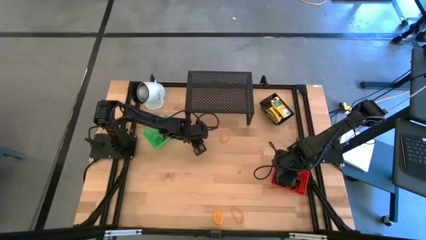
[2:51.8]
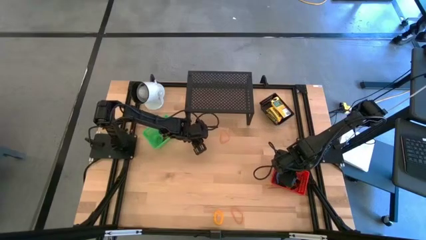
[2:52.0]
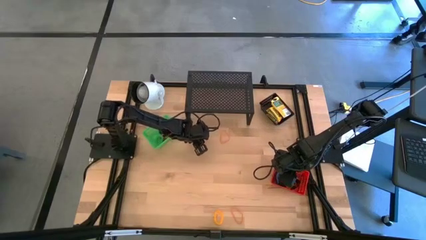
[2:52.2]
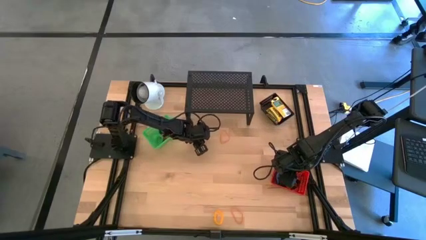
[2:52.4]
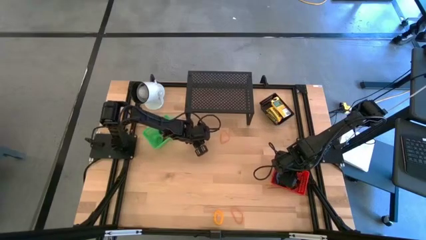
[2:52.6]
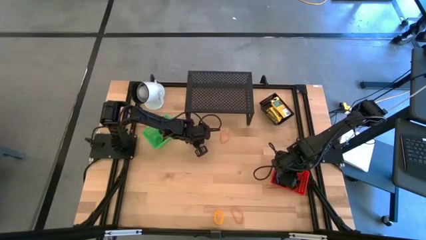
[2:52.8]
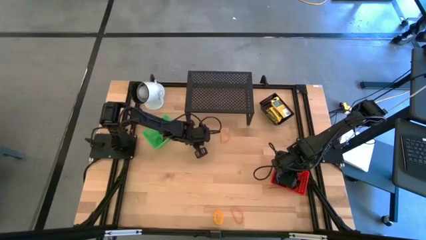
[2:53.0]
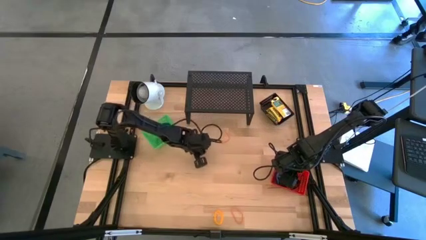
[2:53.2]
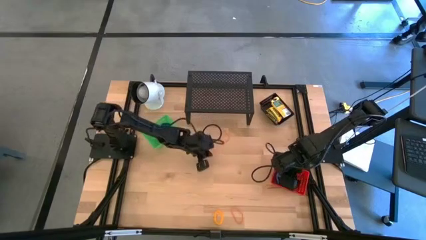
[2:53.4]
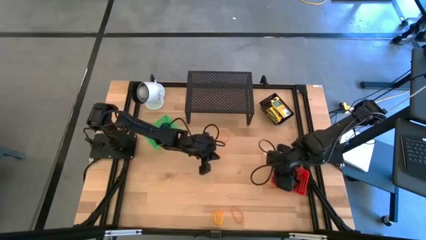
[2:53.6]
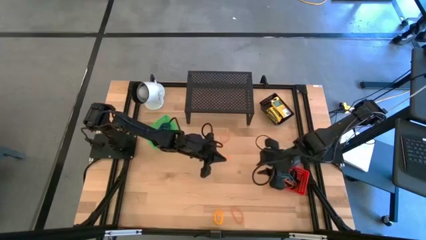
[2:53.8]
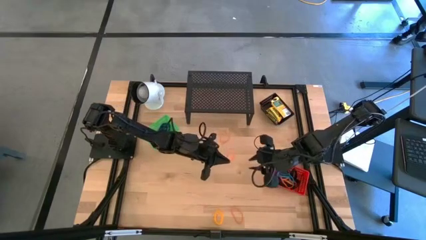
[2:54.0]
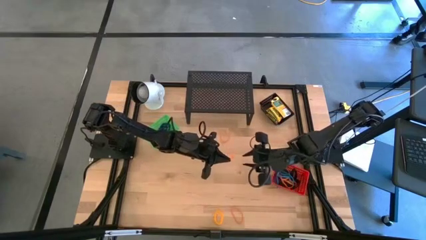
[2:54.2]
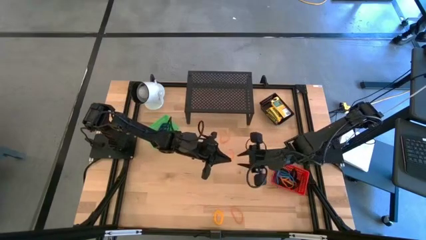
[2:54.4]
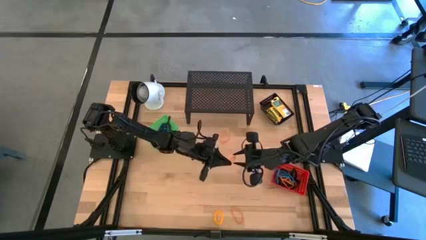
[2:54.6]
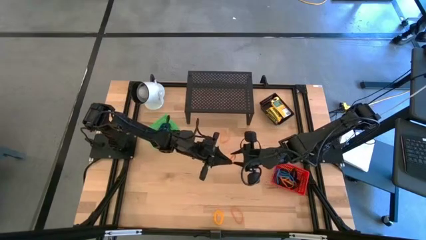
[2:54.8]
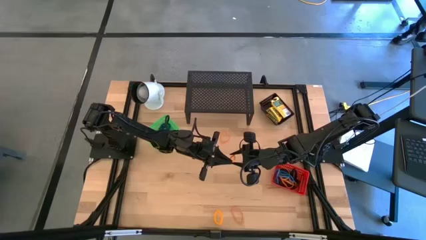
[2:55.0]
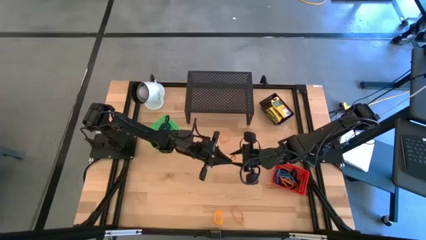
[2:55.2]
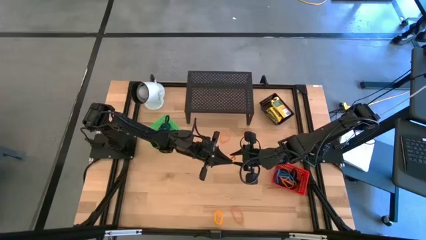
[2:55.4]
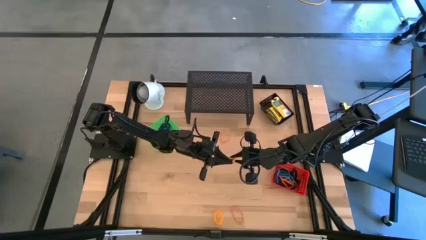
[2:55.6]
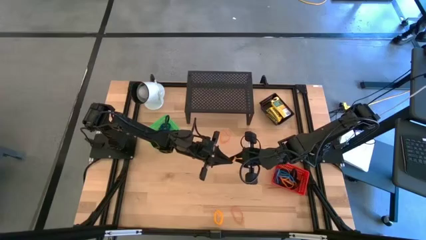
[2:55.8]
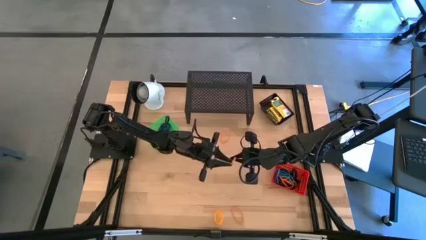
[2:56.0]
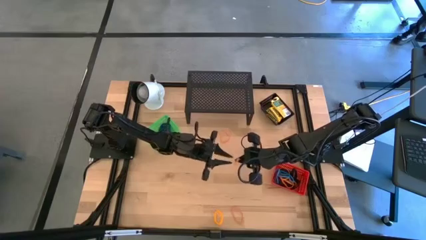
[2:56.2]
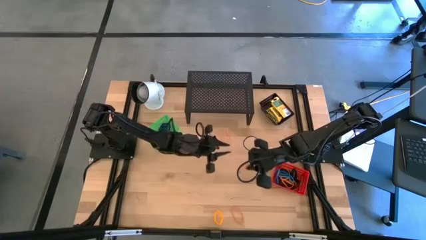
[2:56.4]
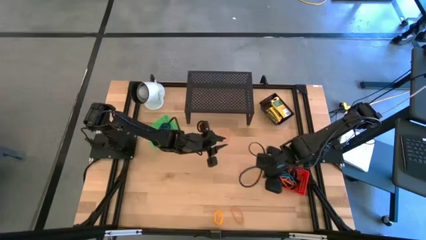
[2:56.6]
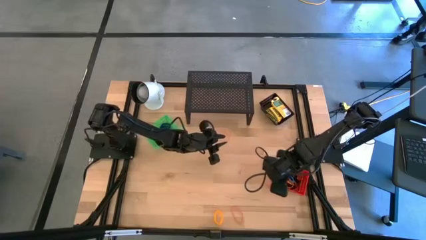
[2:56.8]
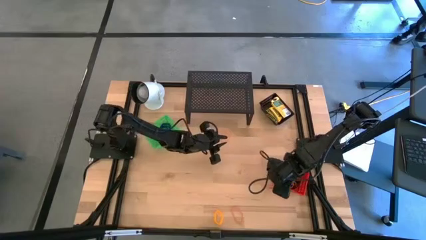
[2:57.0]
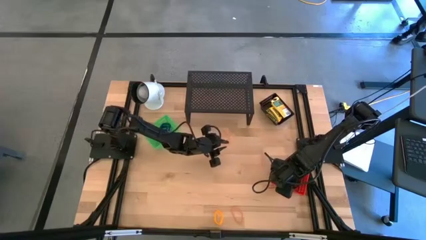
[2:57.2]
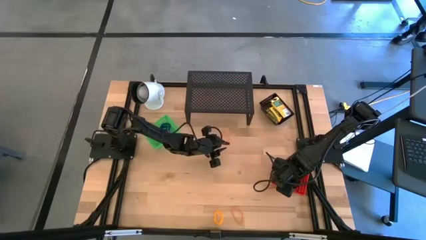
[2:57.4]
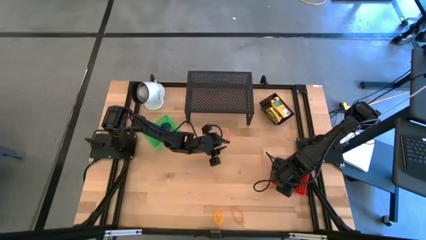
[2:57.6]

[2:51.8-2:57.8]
Task: Pick & Place Office Desk Supplies
Put the top left orange rubber band into the red bin

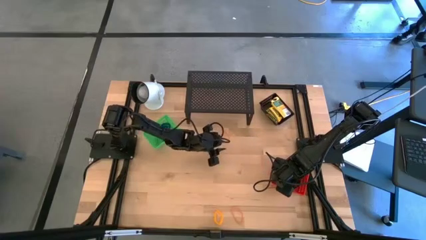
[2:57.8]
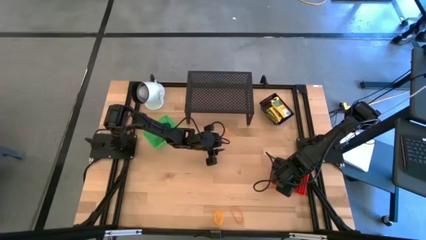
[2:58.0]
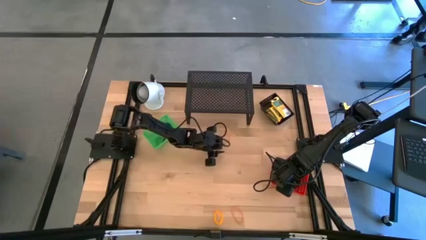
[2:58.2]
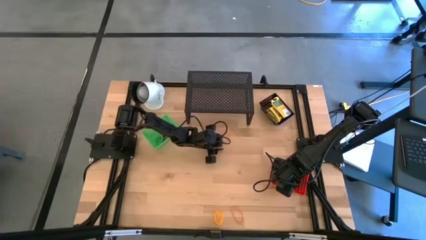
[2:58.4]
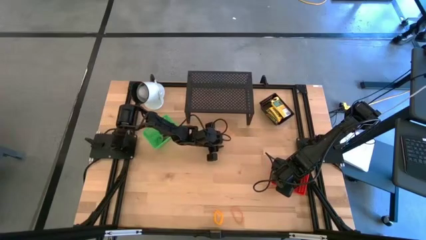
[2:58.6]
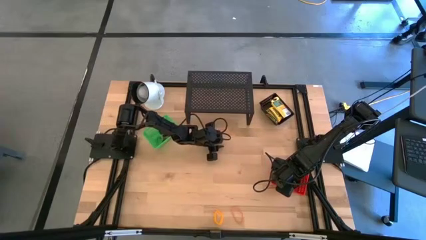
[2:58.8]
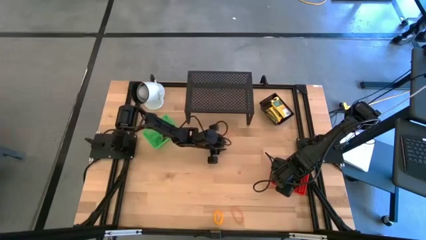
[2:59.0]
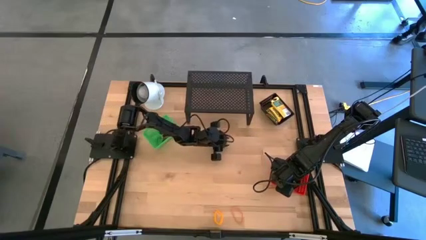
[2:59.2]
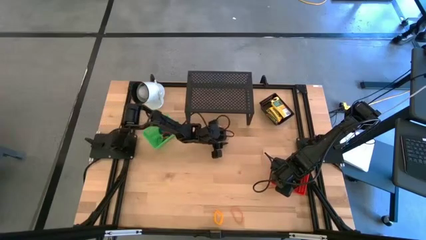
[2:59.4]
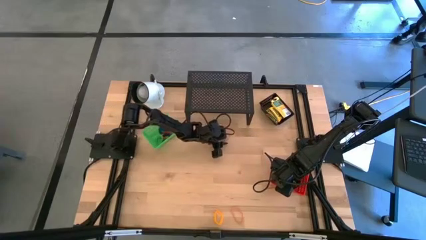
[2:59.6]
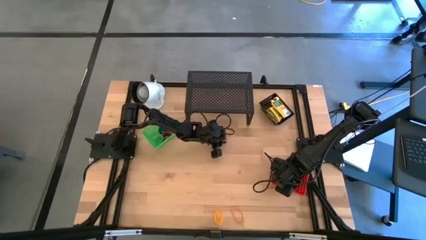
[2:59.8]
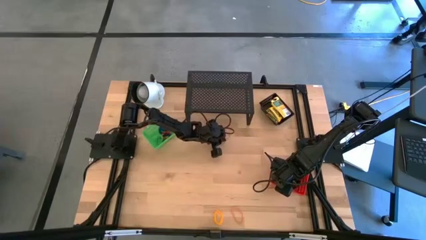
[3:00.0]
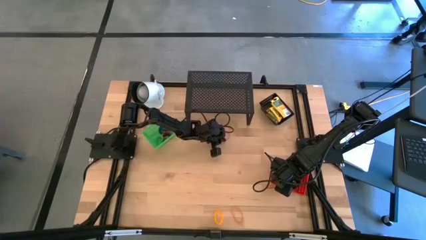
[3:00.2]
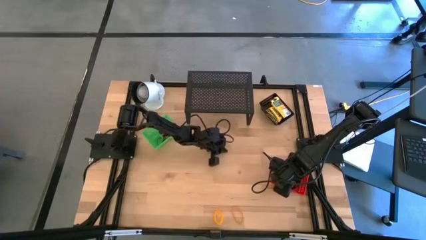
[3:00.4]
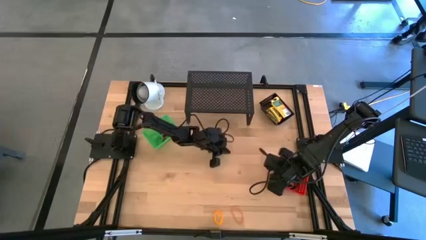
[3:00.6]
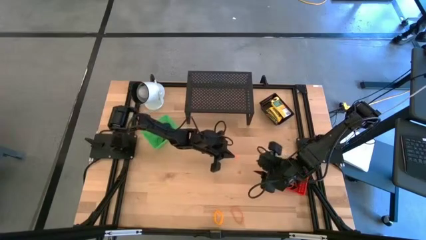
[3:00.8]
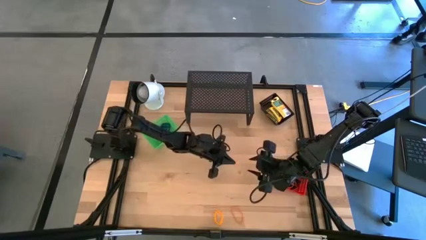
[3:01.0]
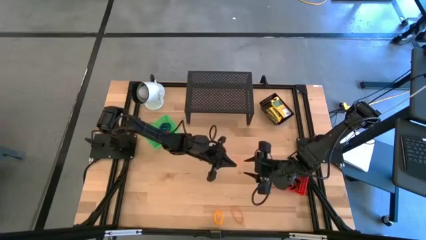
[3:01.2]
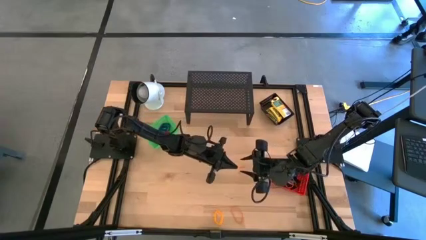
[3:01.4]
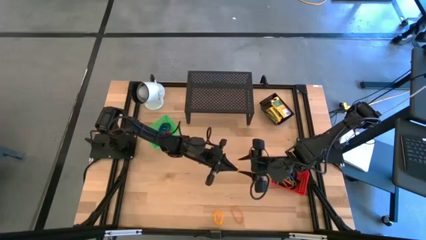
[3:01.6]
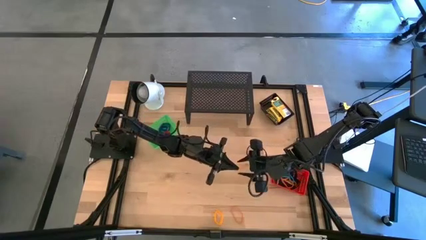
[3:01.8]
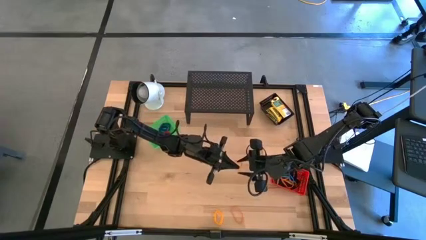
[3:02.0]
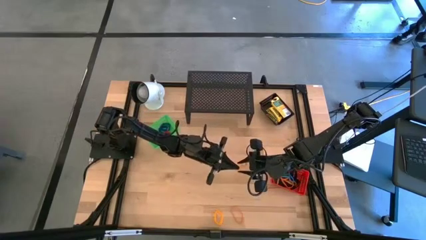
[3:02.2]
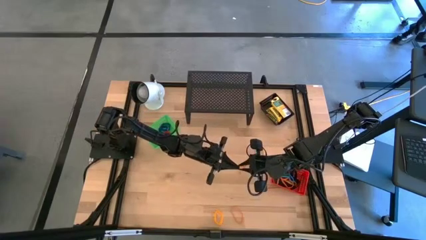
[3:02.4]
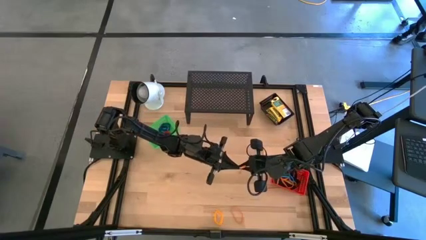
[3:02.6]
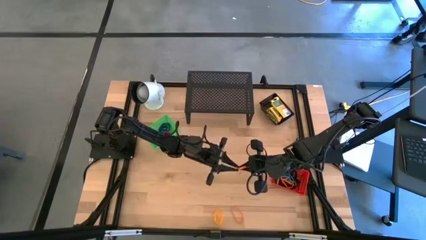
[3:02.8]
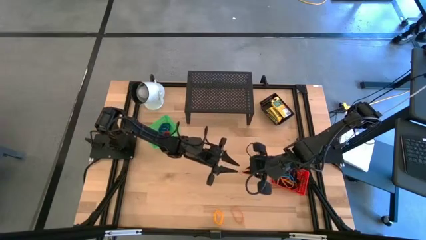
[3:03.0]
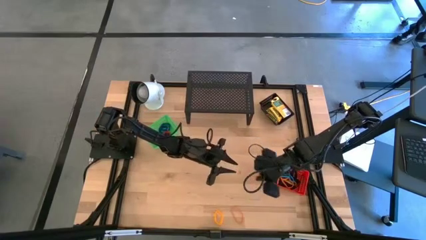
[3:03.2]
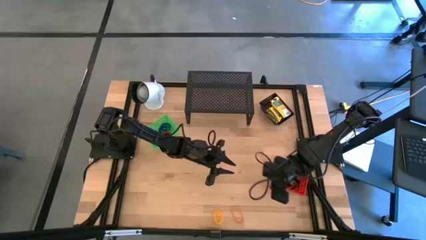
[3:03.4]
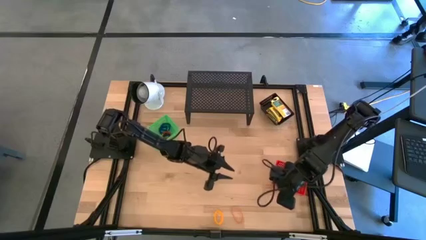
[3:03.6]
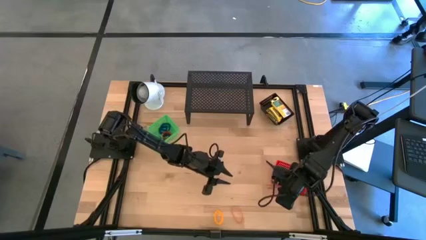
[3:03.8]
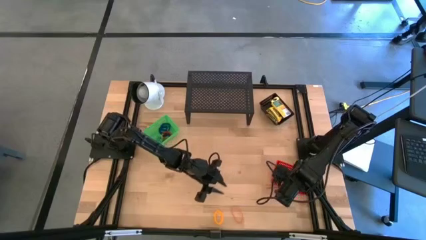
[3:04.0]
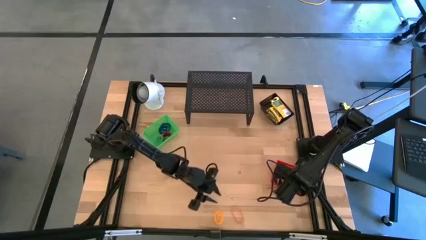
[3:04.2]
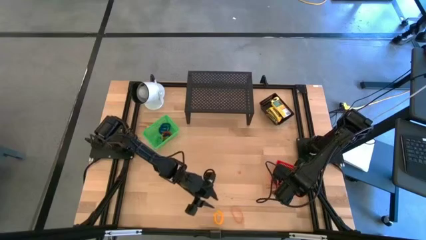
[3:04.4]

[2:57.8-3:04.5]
Put the top orange rubber band into the red bin

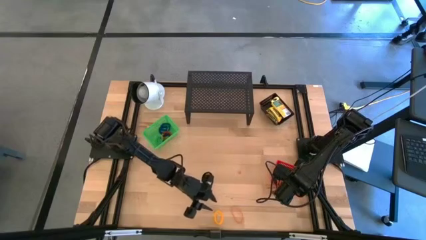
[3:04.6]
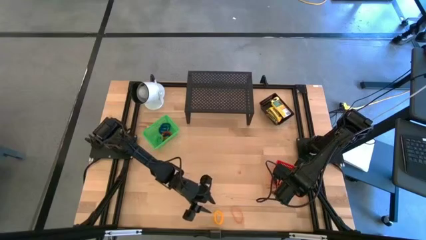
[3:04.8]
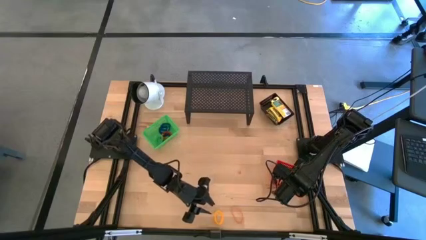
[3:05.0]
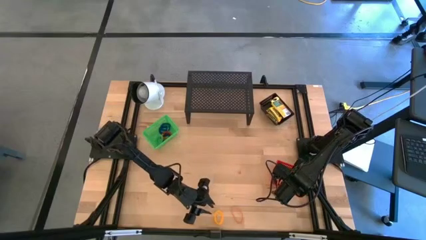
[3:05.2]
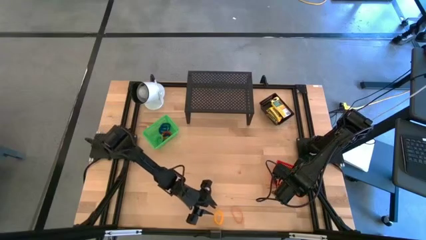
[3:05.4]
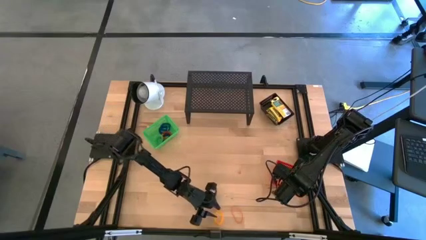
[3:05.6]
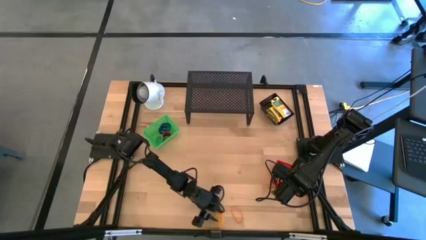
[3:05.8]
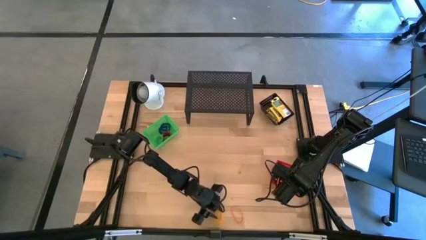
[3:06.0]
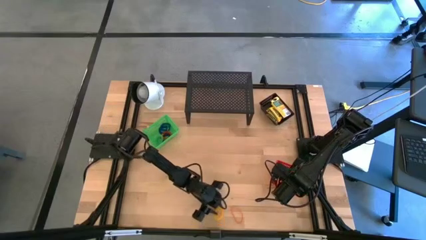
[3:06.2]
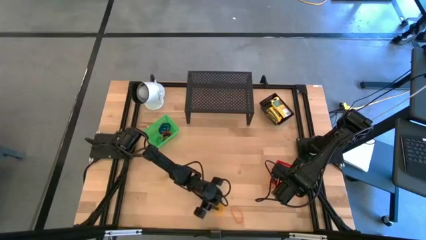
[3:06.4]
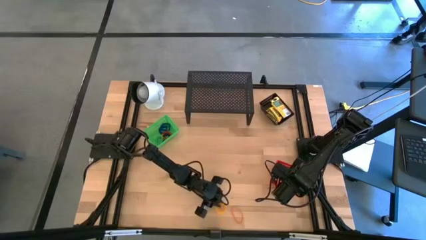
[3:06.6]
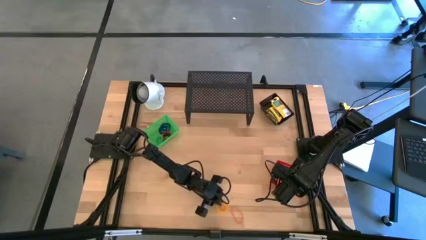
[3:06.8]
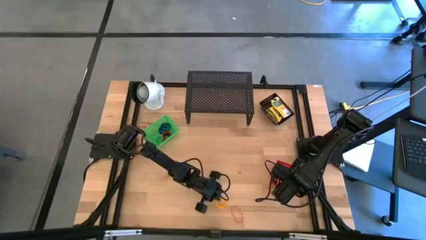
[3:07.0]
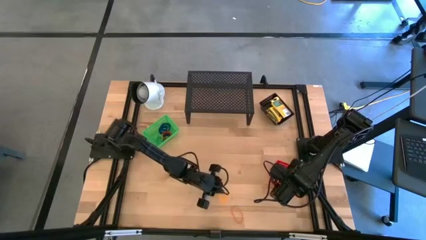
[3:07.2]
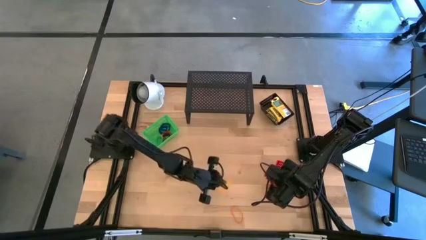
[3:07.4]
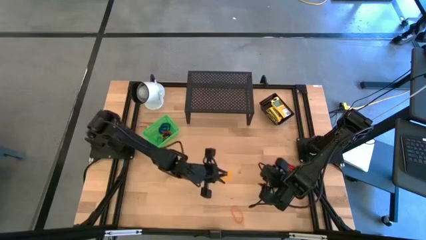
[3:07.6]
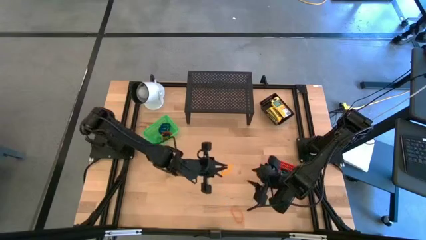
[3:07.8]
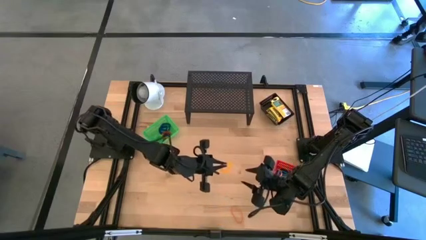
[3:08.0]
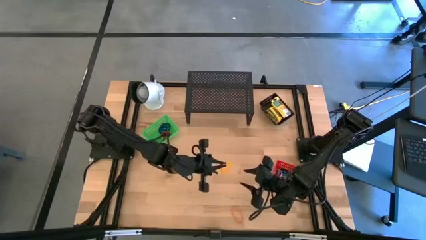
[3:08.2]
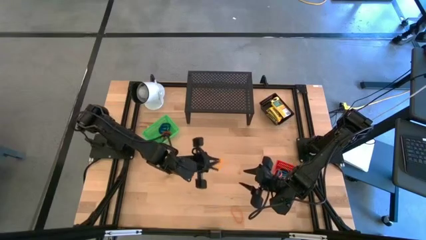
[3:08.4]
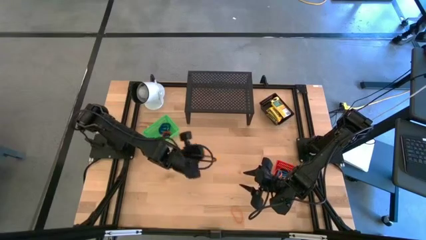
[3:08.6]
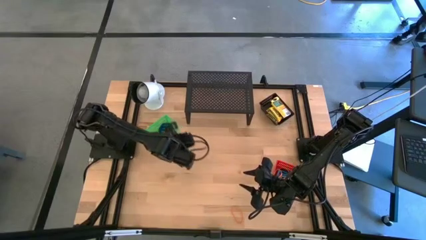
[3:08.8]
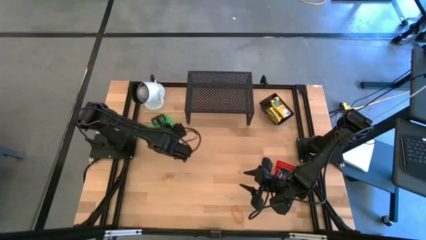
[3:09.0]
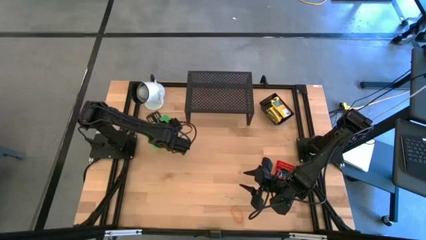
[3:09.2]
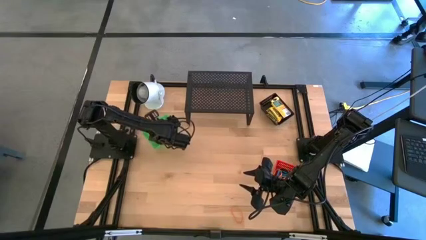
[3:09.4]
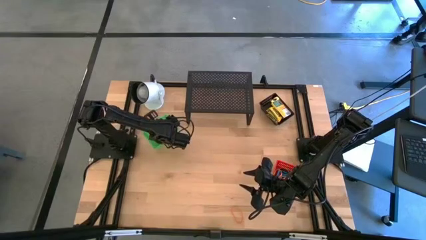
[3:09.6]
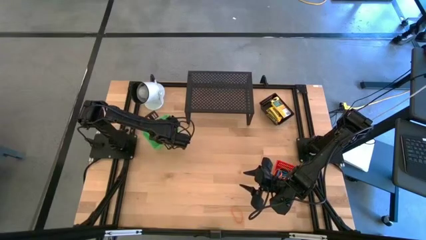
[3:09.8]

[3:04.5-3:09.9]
Put the yellow spring keychain into the green bin
